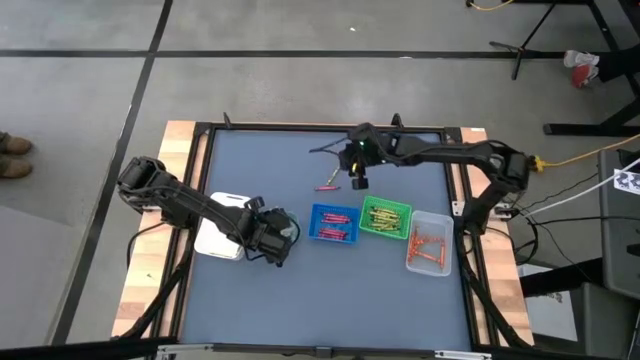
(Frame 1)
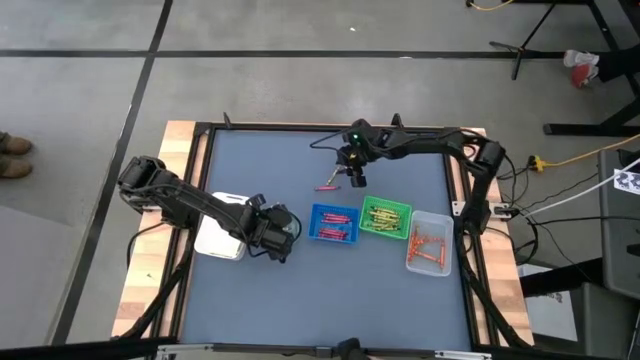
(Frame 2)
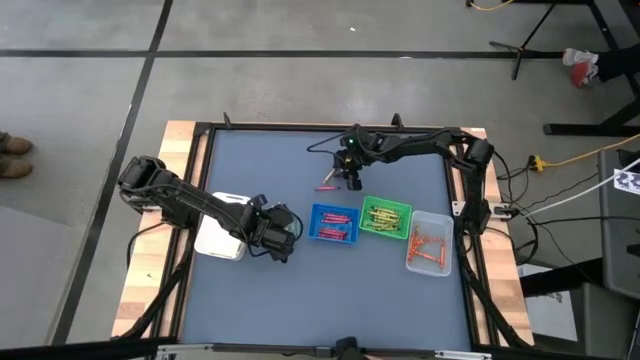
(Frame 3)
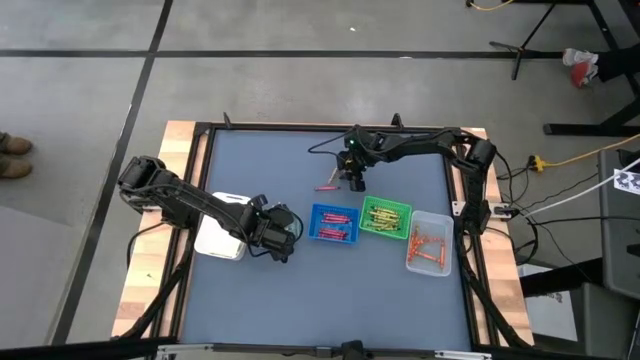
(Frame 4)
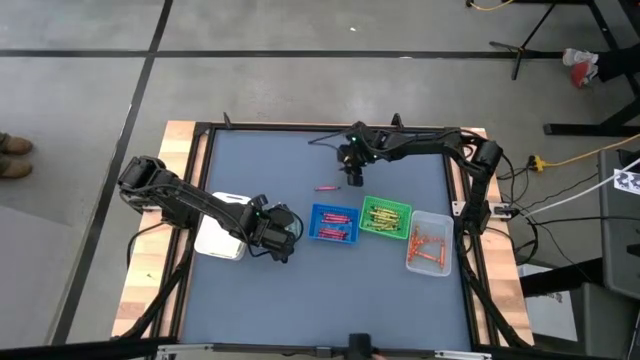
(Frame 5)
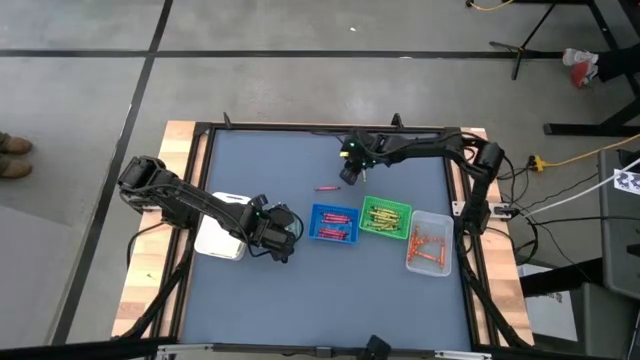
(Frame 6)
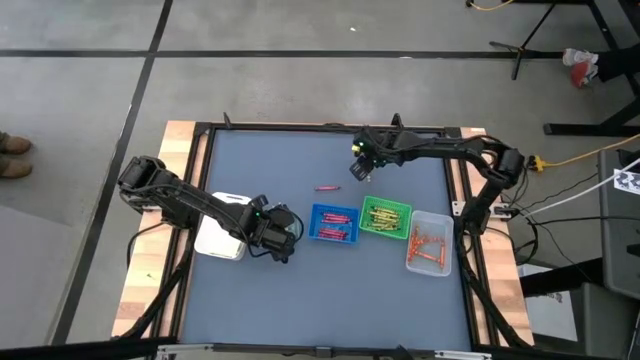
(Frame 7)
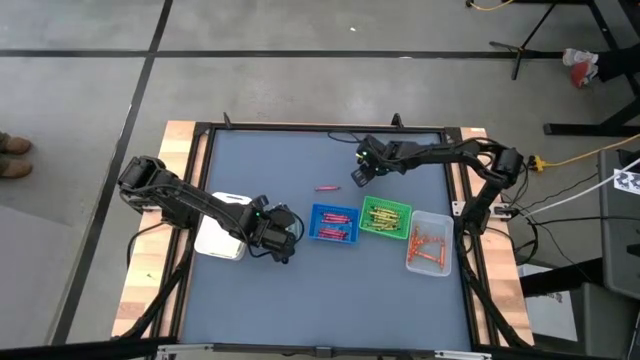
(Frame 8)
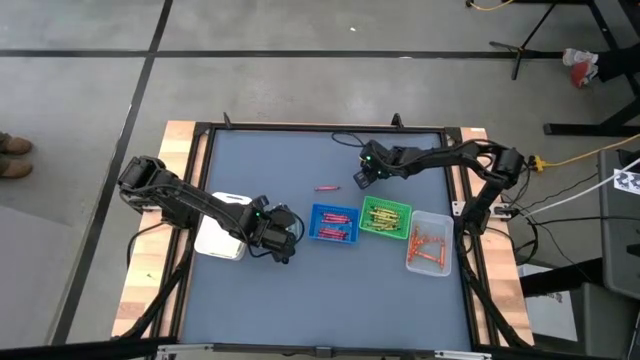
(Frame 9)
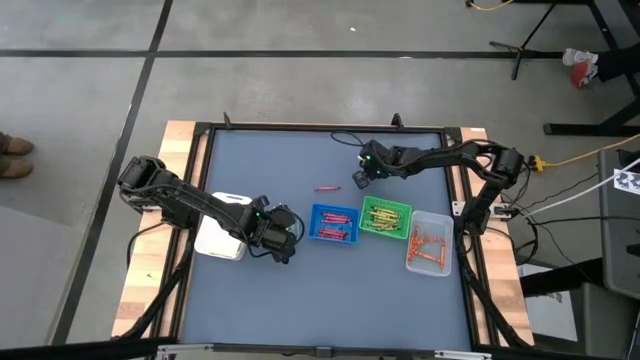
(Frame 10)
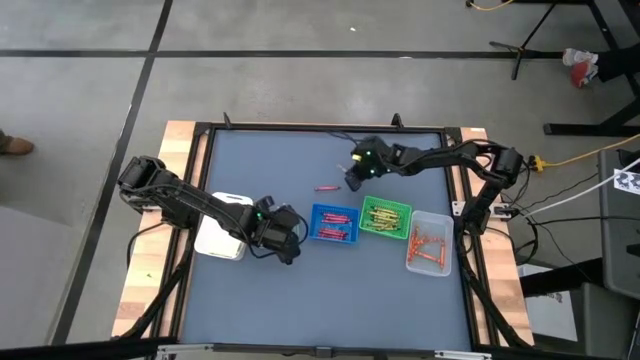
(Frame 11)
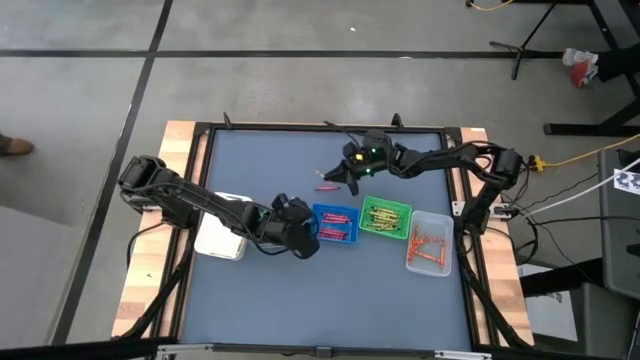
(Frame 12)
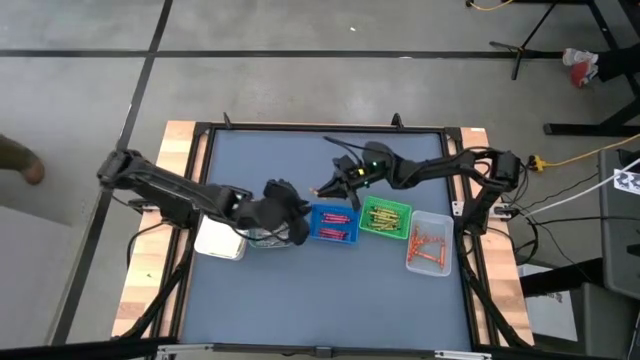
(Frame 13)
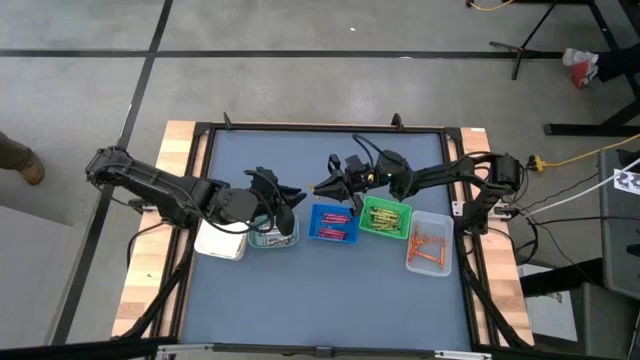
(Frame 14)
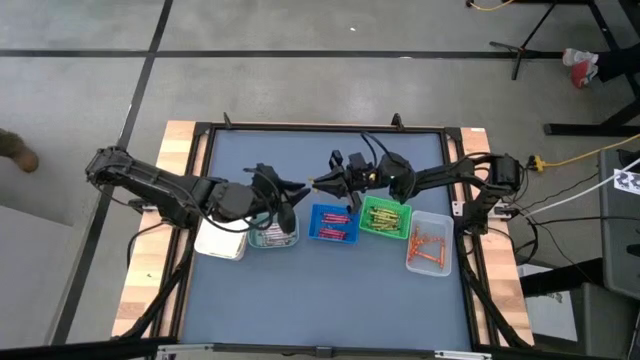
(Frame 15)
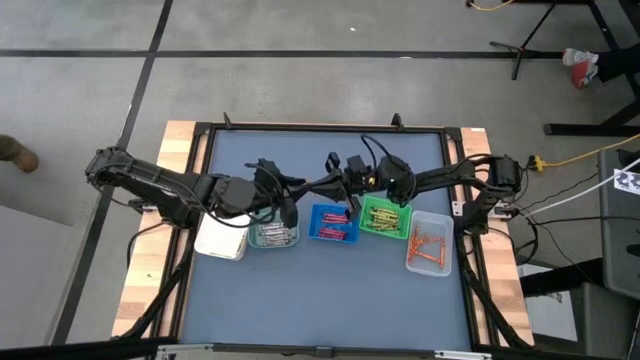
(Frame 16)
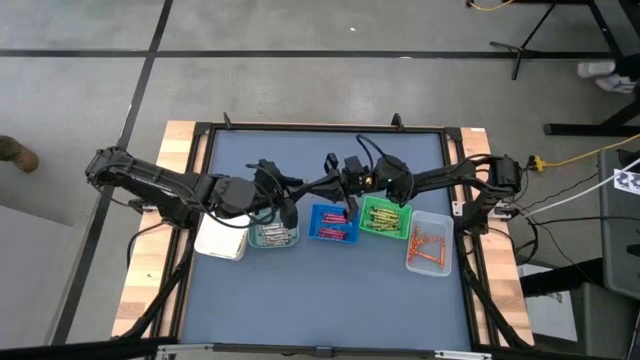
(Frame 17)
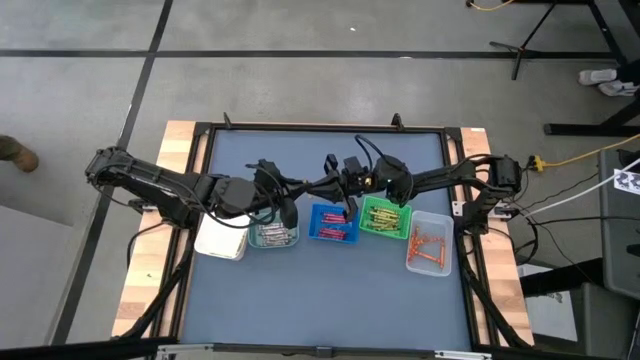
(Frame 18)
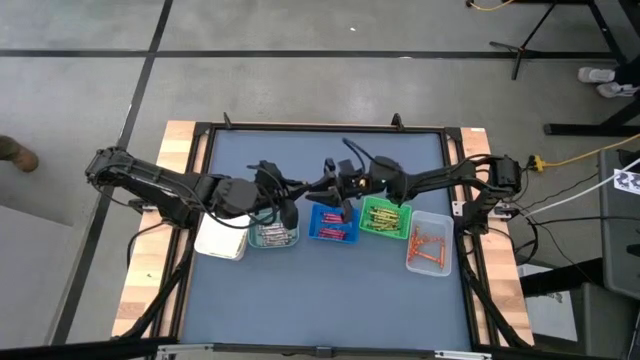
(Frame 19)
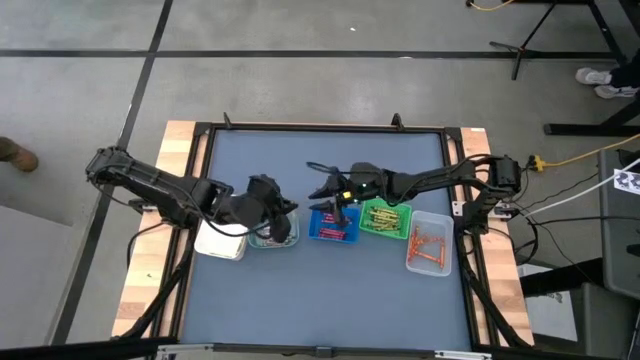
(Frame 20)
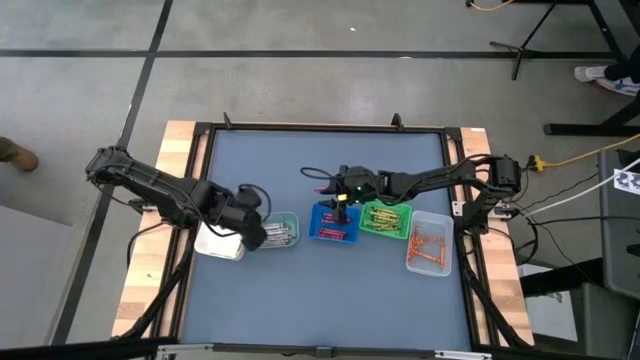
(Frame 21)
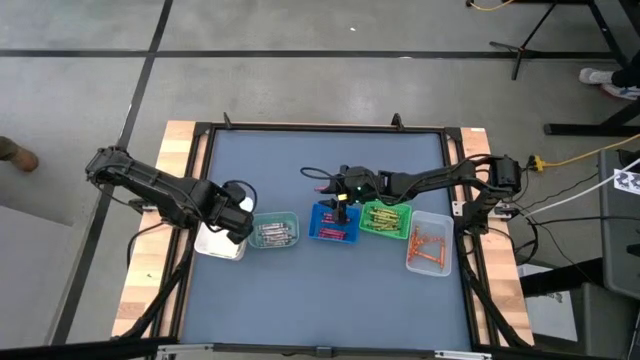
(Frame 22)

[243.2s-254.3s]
Task: Sort crayons
Put the yellow crayon into the white bin

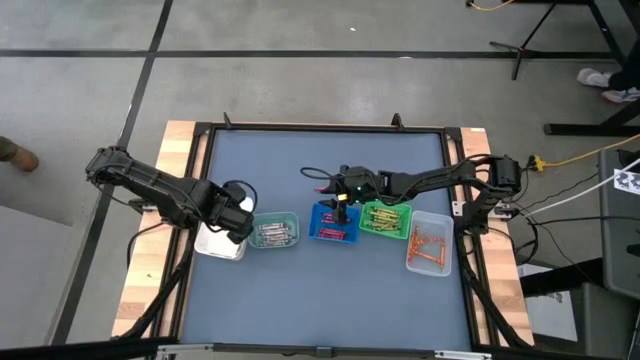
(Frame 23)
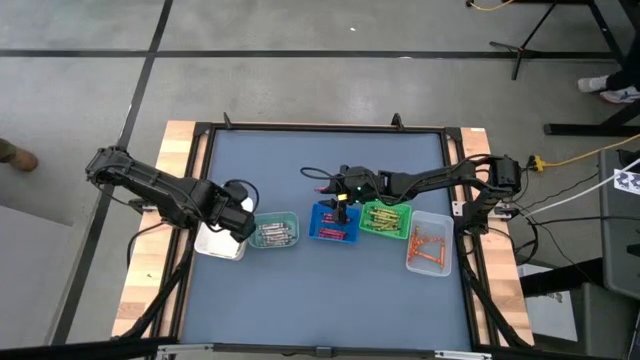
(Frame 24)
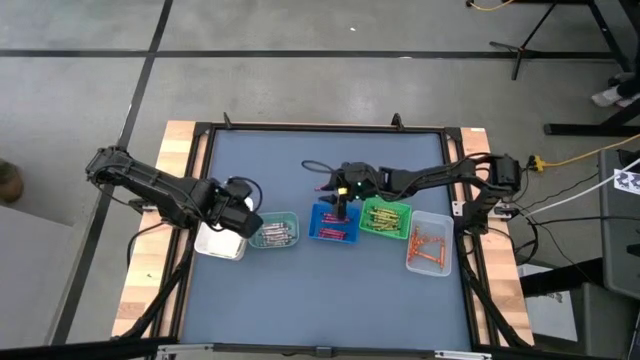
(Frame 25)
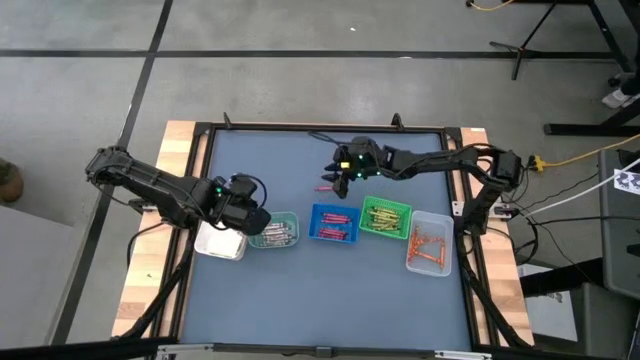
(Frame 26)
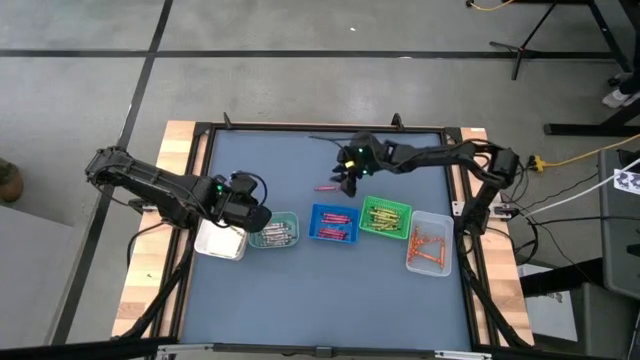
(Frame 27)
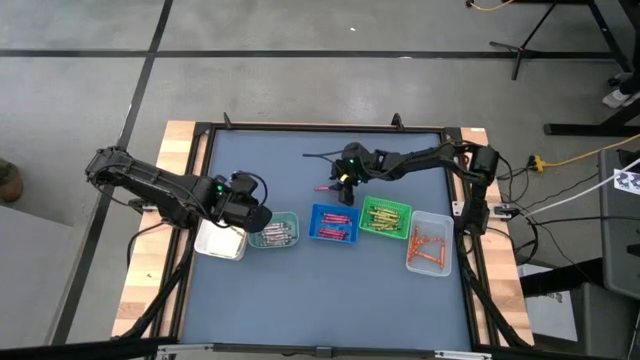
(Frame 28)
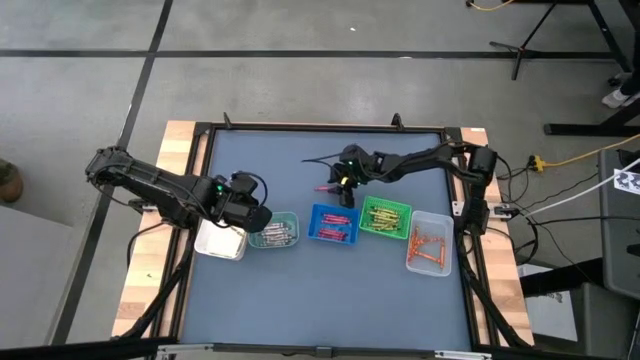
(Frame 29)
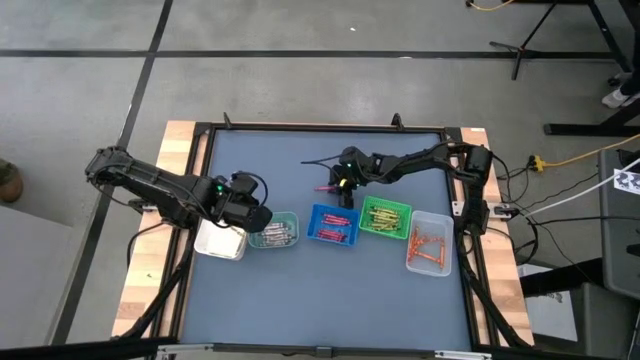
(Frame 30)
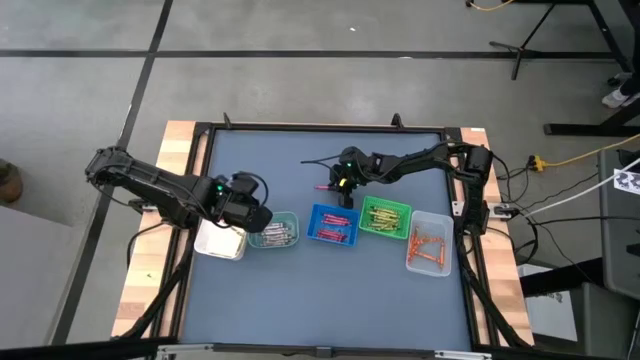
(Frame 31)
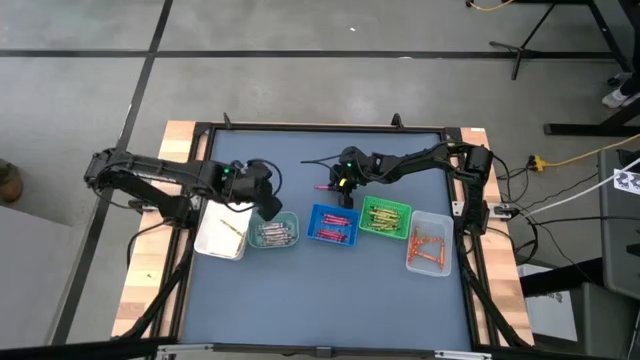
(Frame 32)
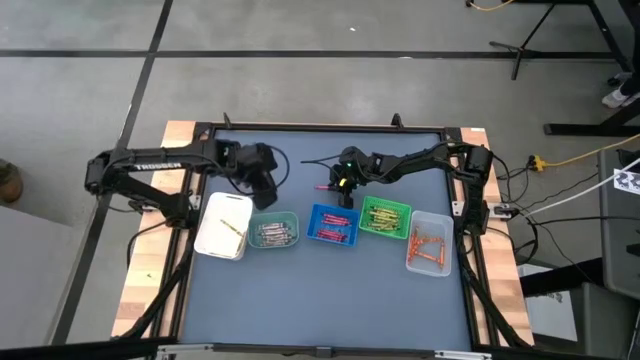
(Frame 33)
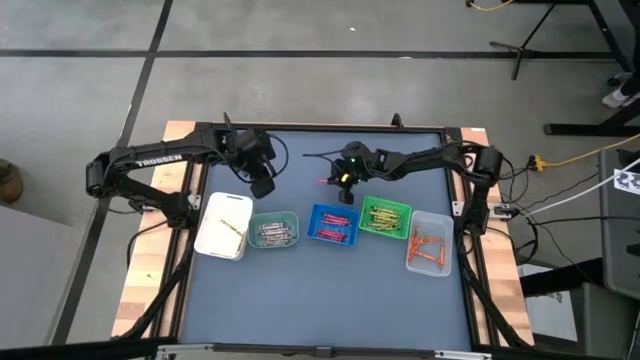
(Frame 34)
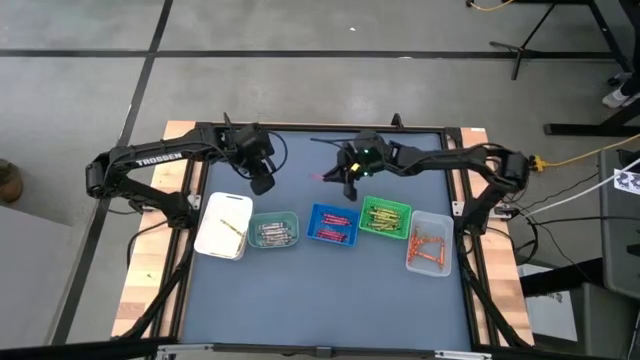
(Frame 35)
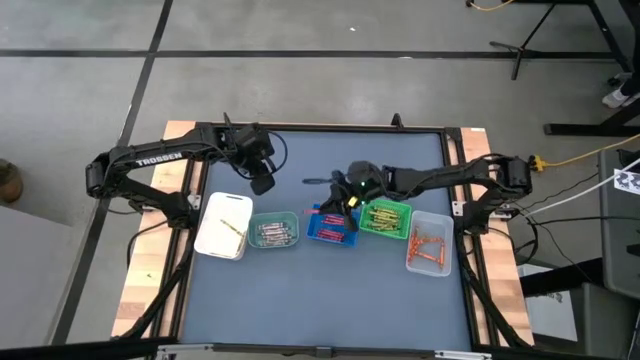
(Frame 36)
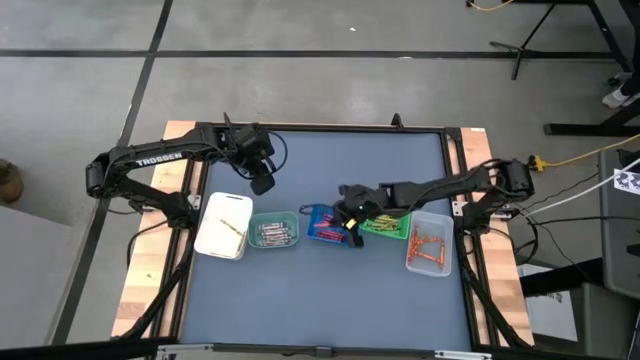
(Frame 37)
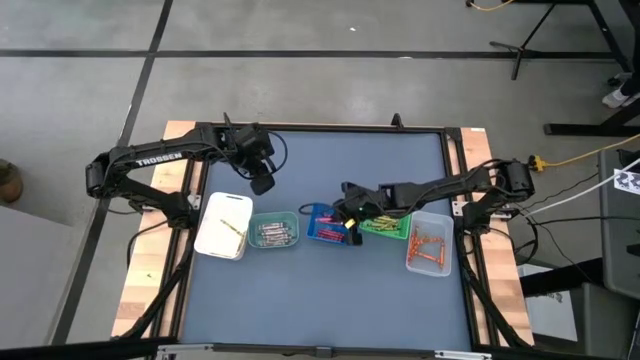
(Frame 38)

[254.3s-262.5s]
Put the red crayon into the blue bin

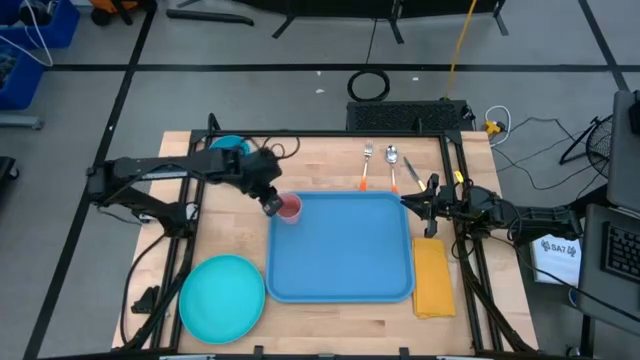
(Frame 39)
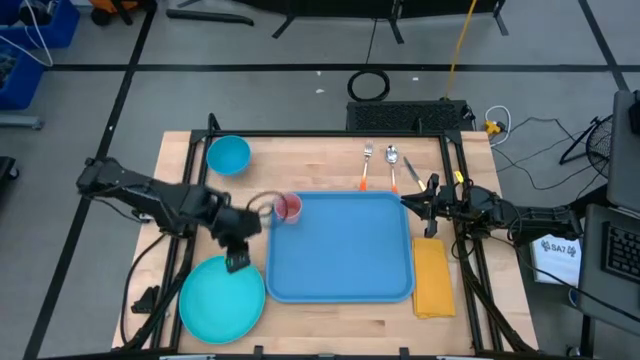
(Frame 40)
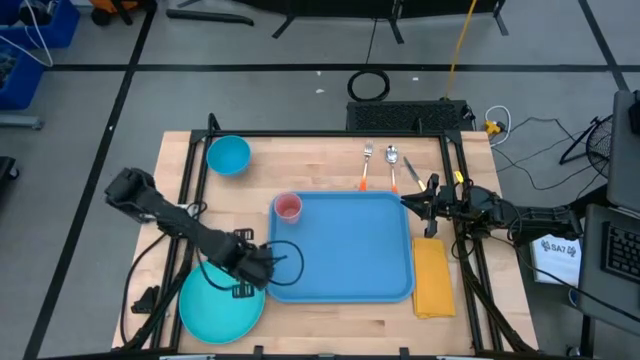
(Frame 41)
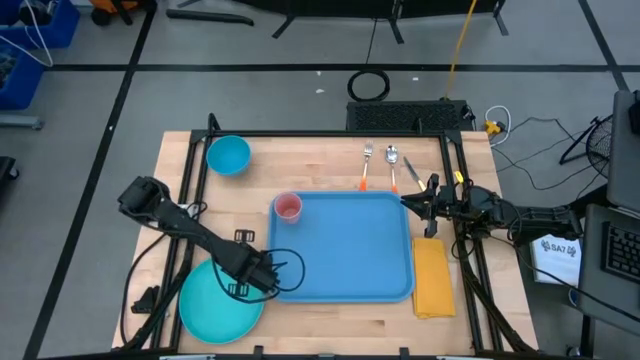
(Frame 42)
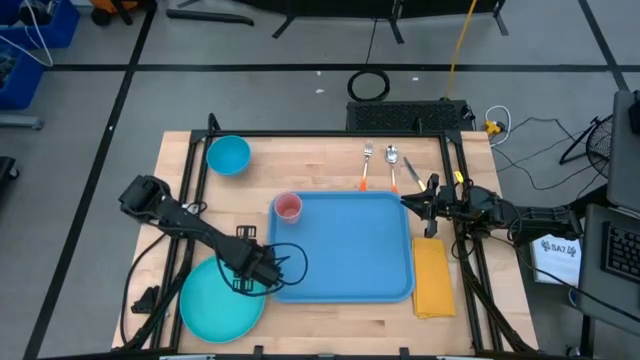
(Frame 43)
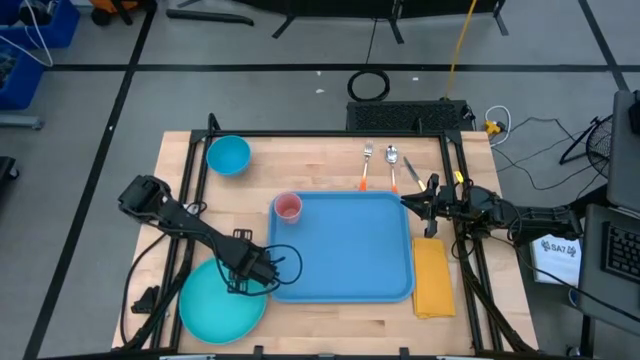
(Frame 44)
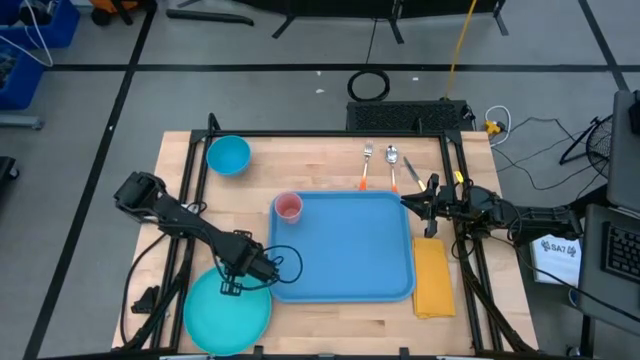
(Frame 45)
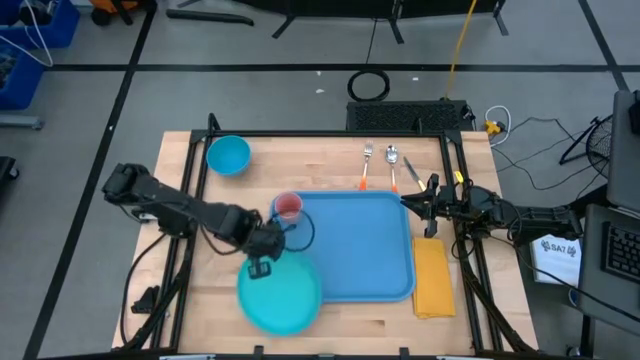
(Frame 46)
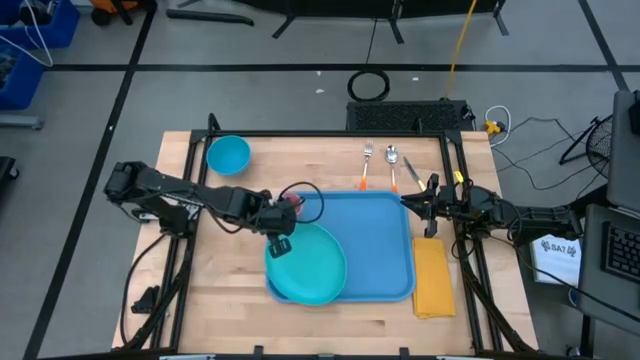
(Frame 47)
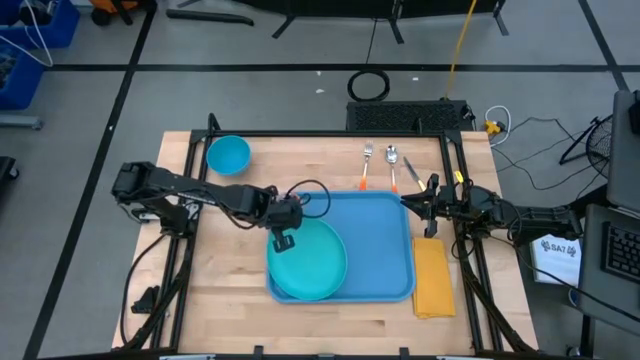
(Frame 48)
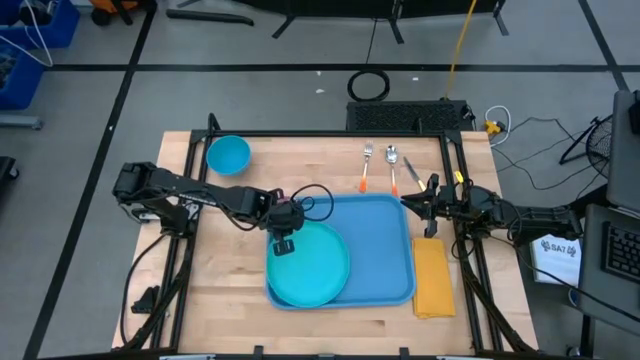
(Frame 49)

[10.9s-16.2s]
Task: Set up tray
Put the light blue plate on the blue serving tray below the pink cup
